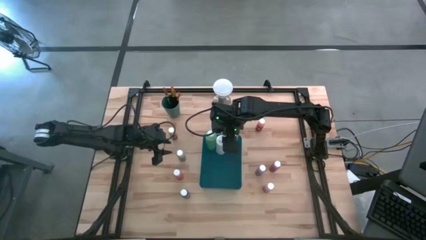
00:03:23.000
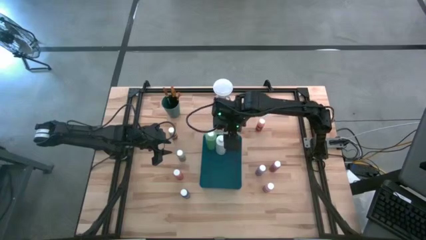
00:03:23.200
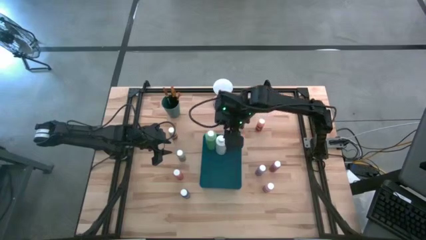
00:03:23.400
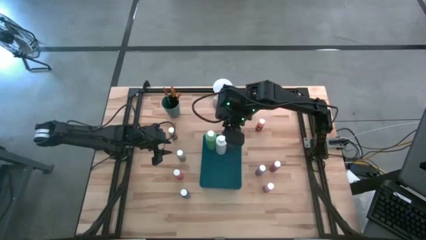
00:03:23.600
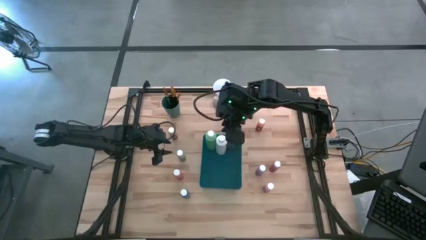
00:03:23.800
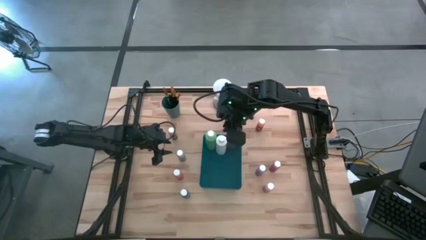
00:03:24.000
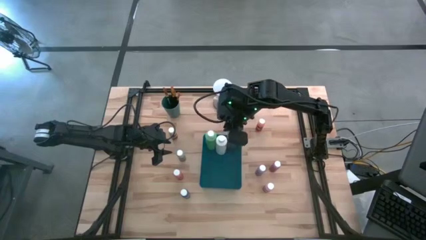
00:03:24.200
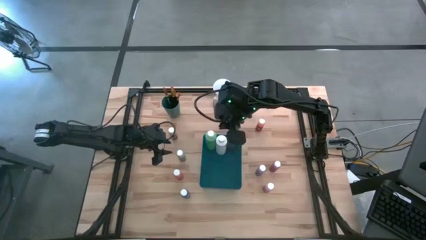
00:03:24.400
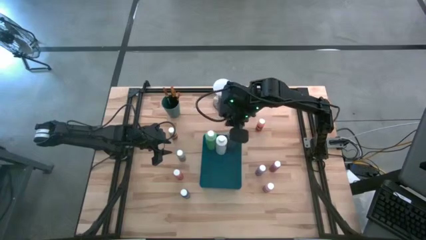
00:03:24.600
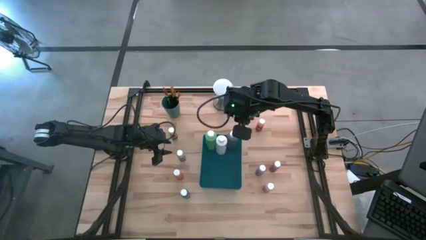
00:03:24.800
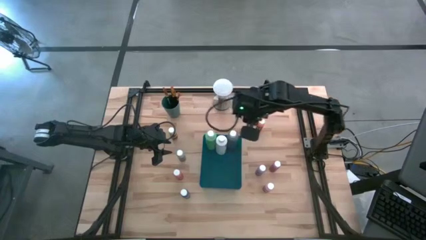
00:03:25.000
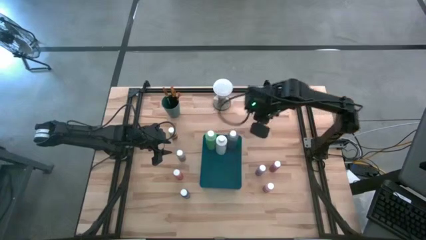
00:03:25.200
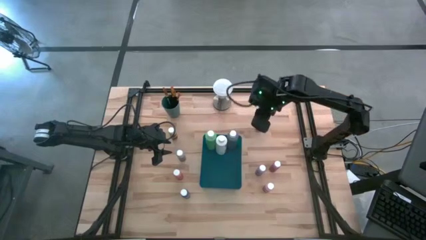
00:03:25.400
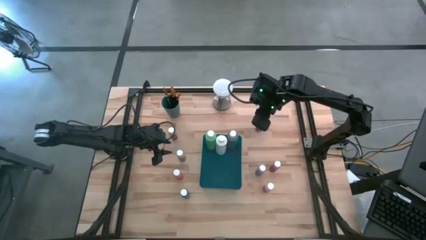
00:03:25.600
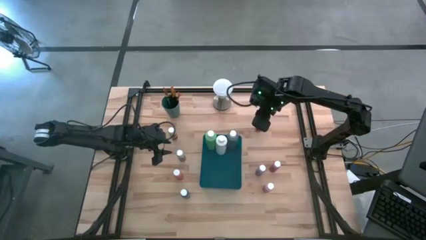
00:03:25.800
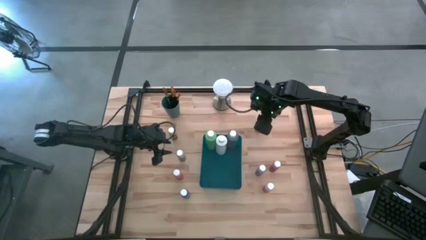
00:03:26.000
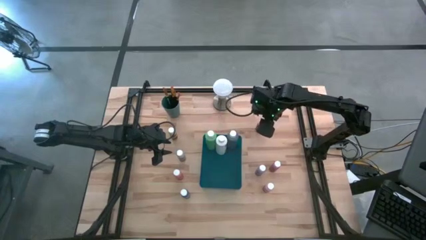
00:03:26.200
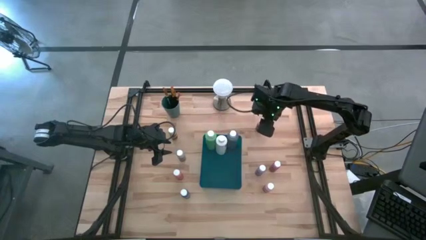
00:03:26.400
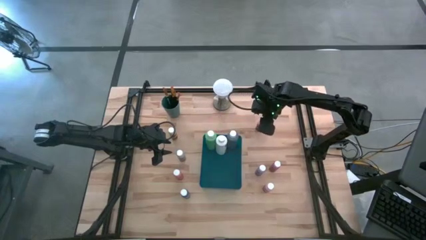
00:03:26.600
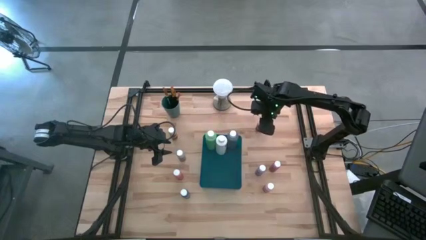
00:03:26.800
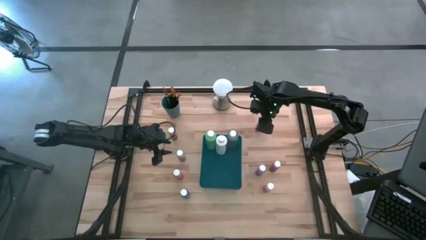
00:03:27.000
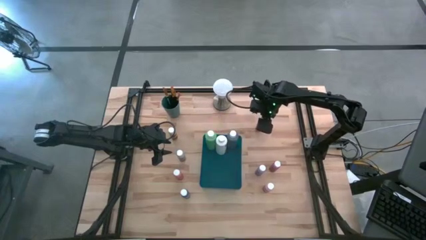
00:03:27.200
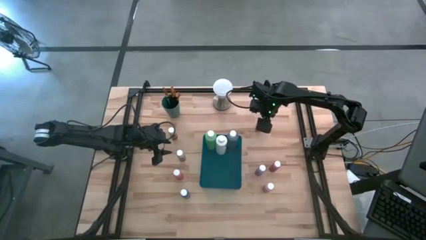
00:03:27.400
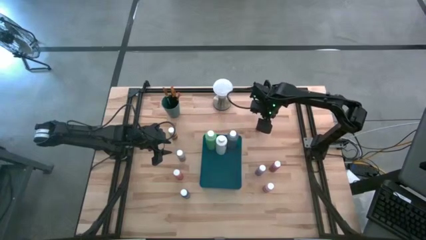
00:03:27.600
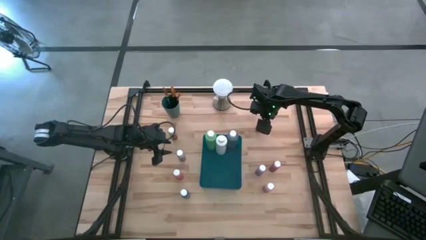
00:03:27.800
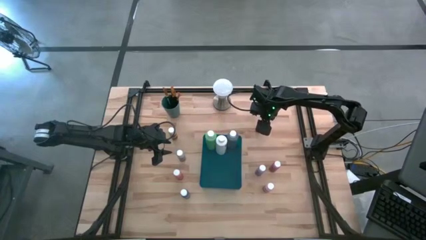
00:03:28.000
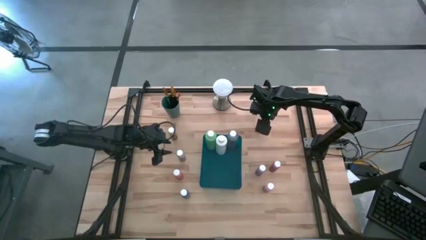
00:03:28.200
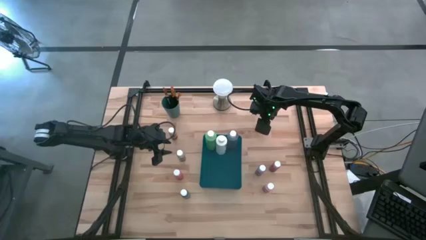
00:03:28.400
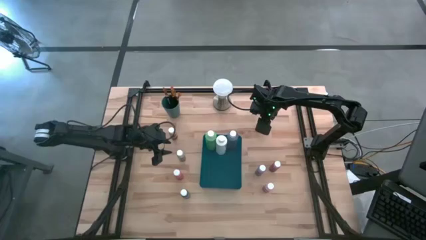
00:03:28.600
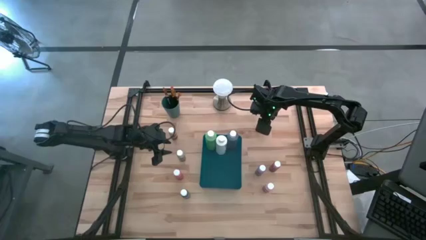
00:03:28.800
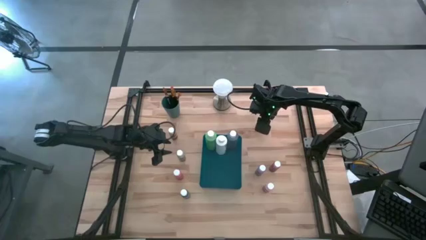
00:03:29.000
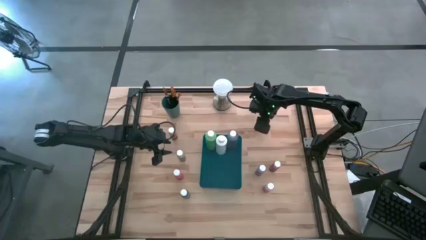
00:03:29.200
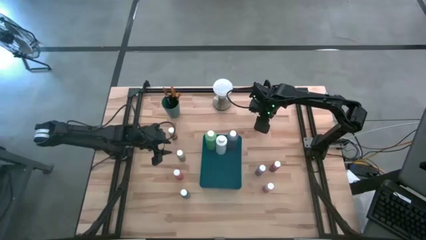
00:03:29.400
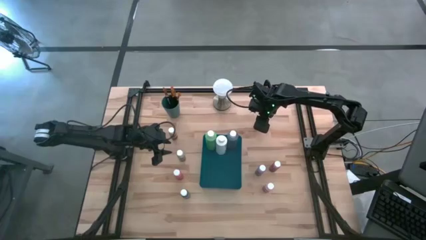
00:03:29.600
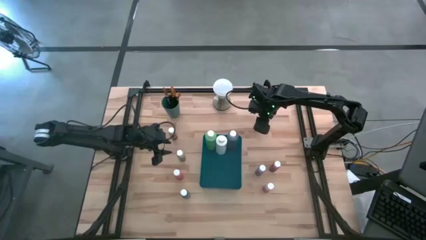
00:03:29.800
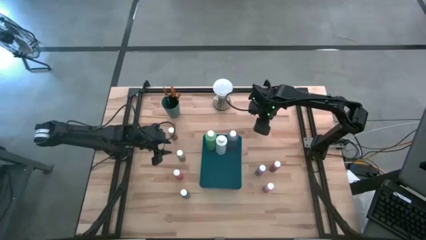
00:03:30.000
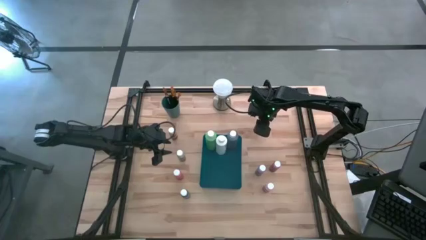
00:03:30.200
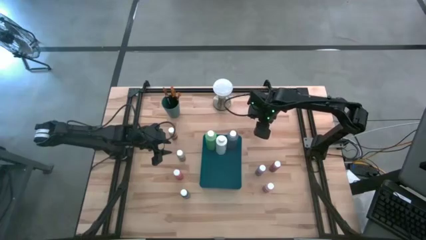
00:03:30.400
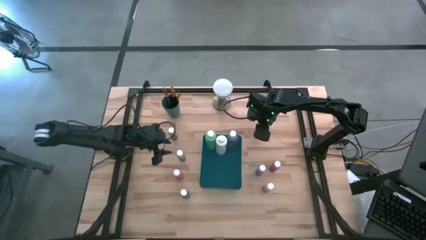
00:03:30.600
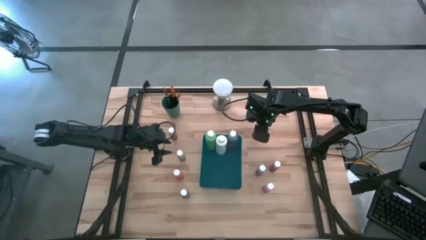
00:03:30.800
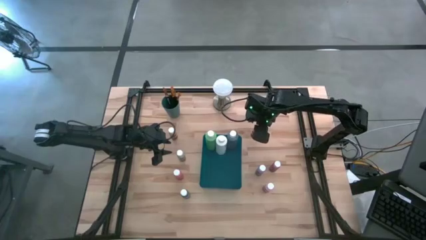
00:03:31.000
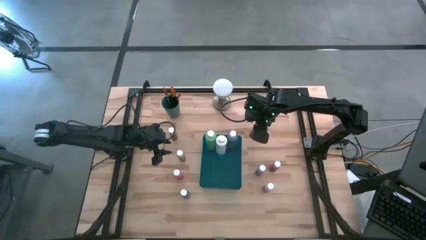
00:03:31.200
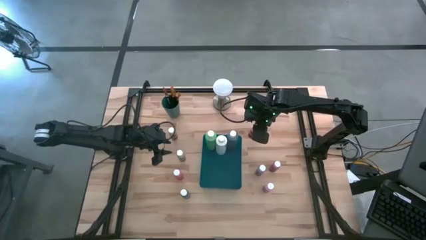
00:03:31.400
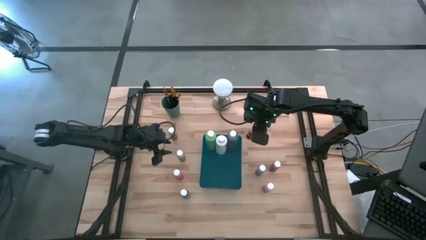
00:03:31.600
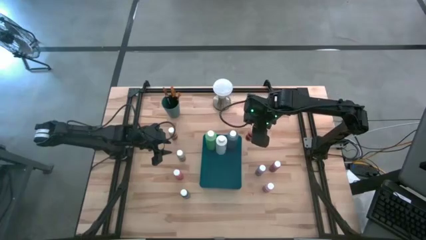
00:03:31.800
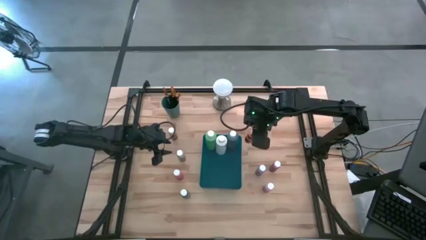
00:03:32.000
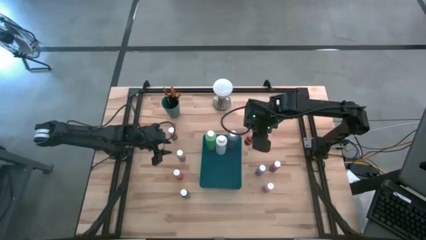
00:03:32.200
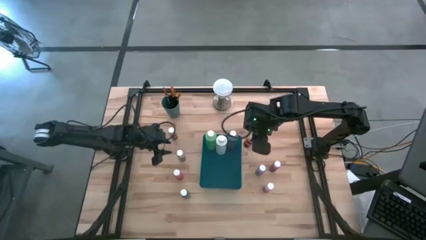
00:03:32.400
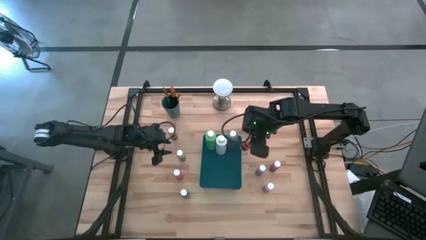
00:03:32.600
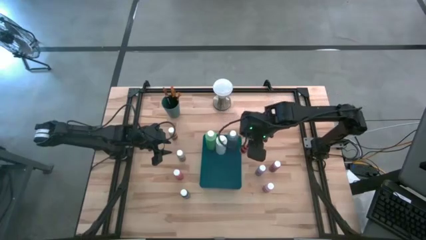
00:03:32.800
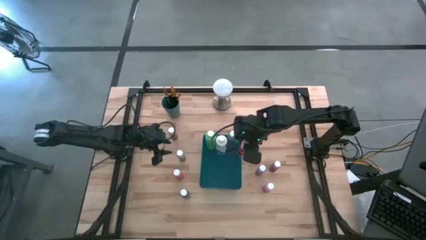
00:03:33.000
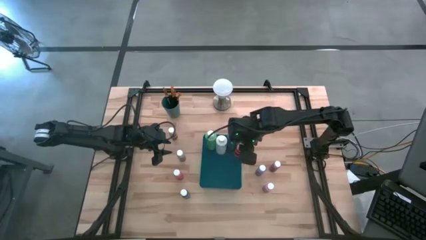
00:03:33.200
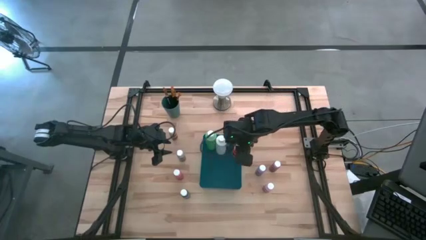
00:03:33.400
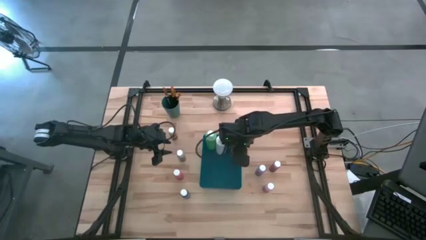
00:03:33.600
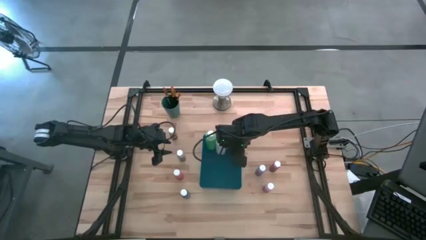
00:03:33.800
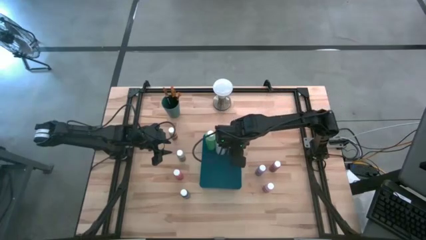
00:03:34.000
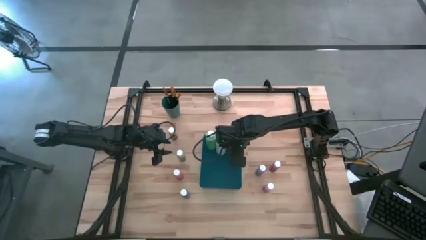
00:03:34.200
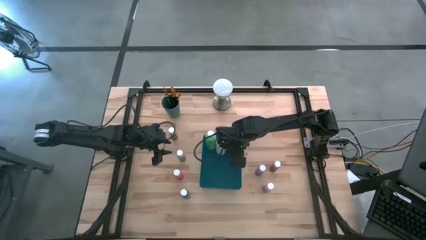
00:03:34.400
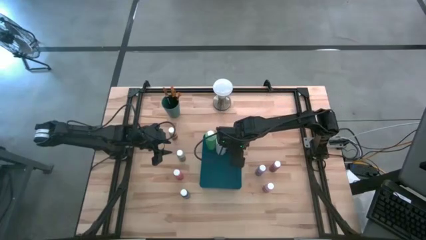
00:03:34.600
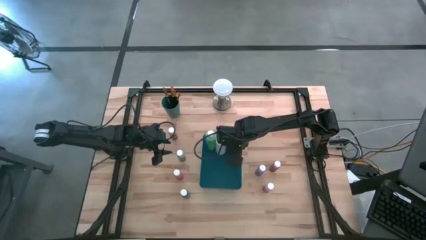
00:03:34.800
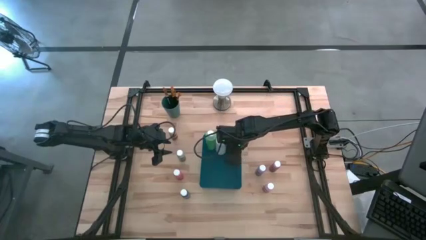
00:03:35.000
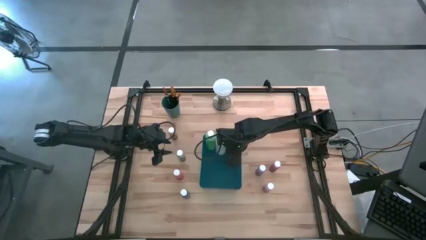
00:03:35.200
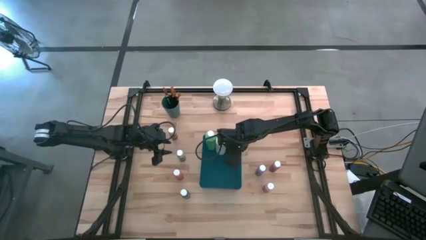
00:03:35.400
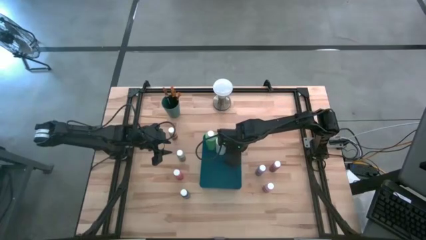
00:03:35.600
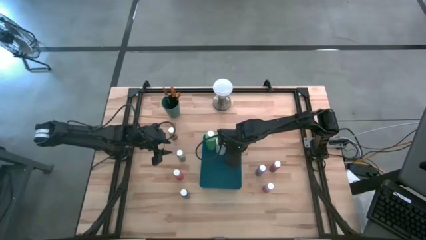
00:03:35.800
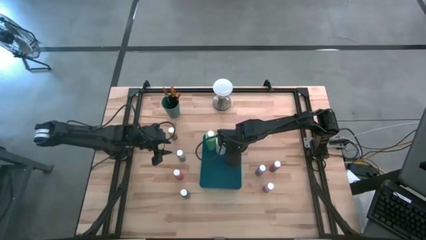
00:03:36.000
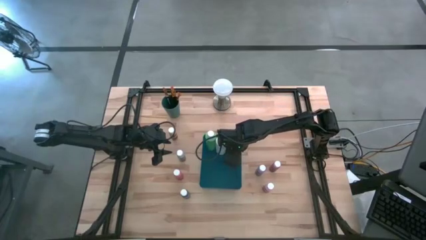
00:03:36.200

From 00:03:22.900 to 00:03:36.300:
Task: Pick & Place Paint Supplies
Put the orange paint bottle into the blue bin

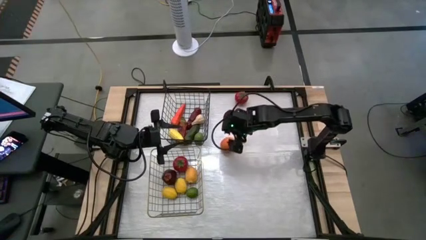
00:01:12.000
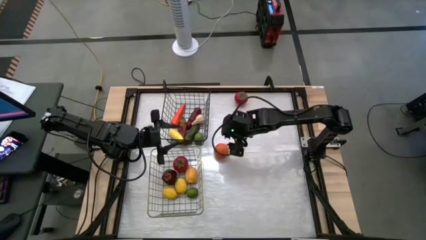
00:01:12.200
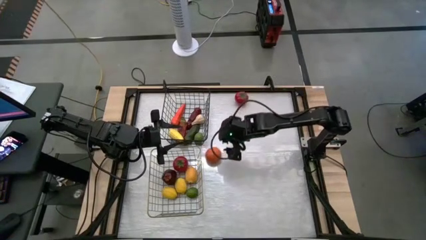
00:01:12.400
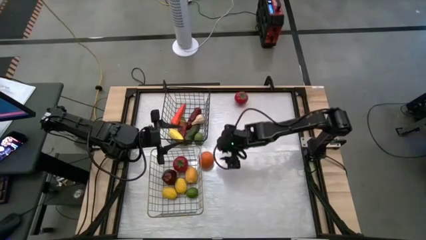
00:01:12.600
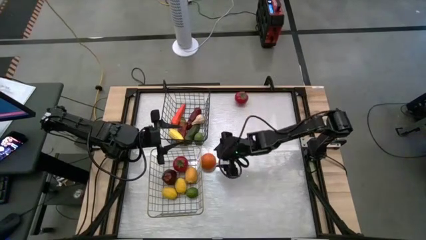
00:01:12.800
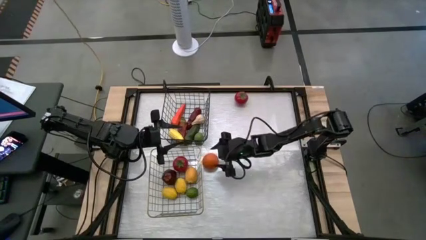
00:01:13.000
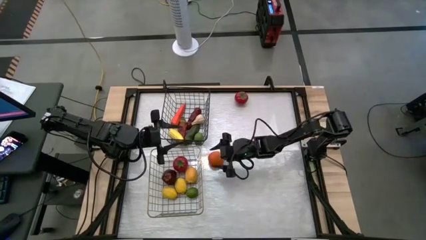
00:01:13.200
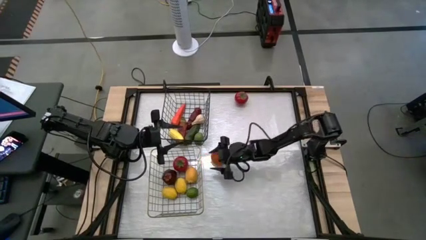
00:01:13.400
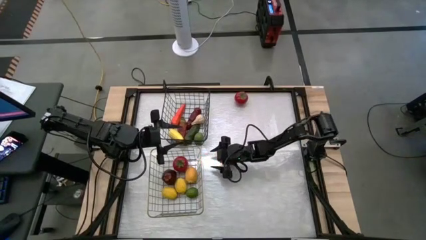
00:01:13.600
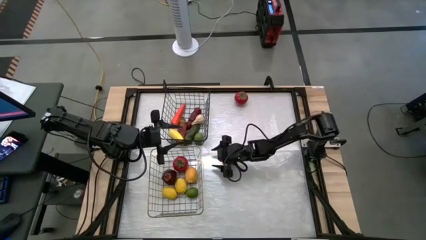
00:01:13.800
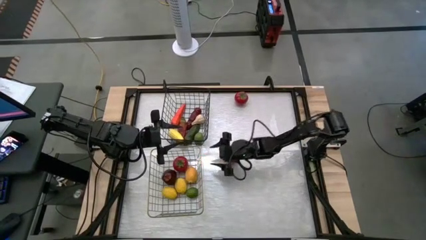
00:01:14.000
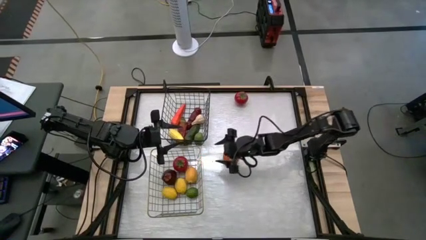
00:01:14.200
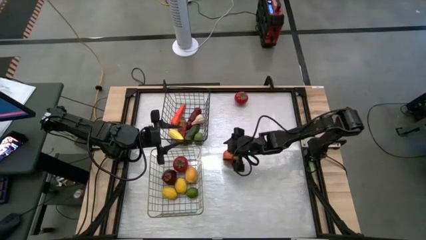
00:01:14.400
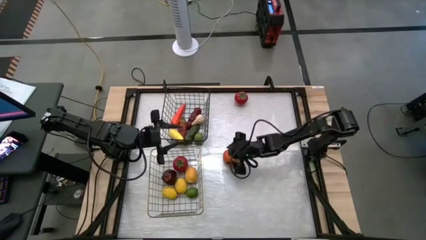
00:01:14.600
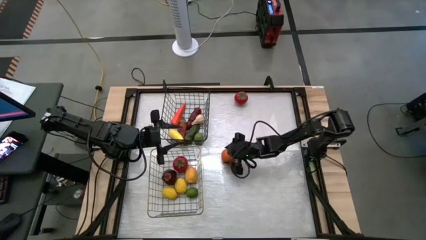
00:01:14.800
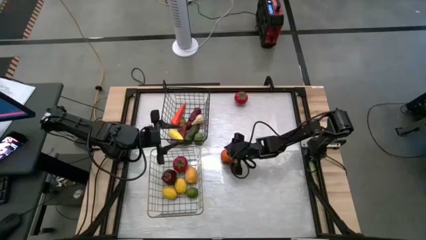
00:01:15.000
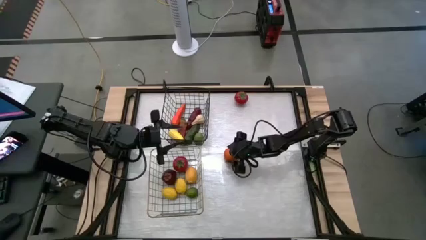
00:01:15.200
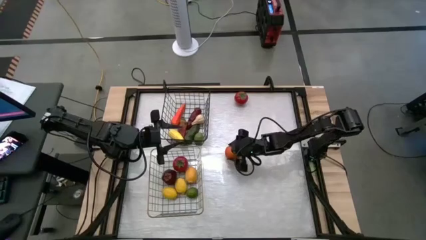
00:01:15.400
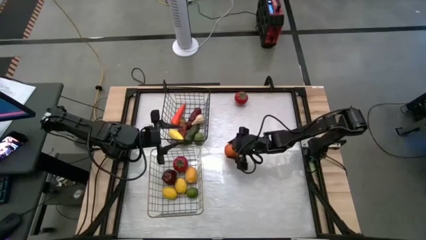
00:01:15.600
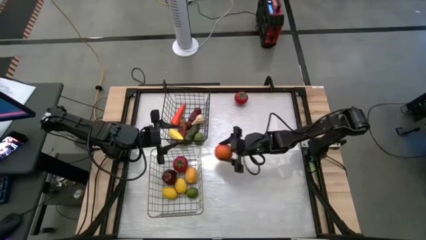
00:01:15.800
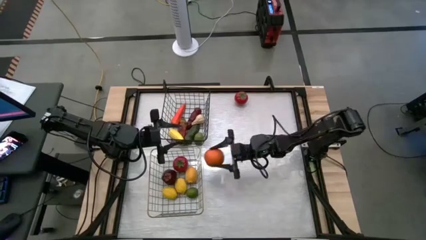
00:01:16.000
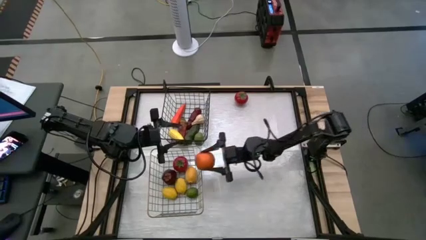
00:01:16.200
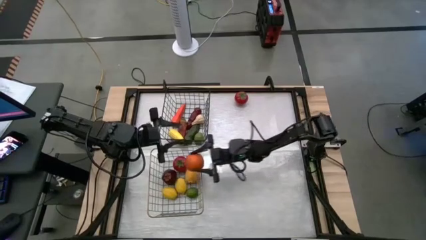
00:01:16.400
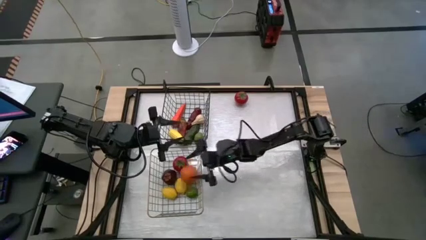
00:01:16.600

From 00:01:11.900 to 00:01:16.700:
Task: Sort produce into baskets
Put the orange into the gold wire basket
